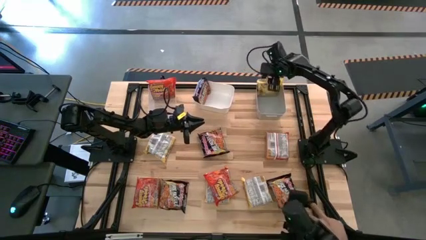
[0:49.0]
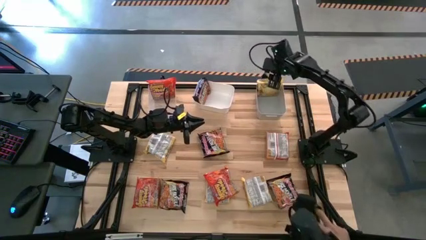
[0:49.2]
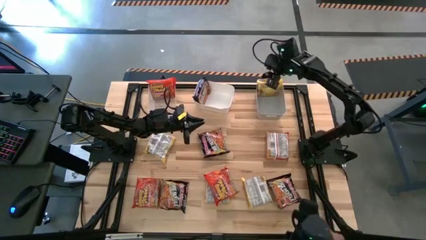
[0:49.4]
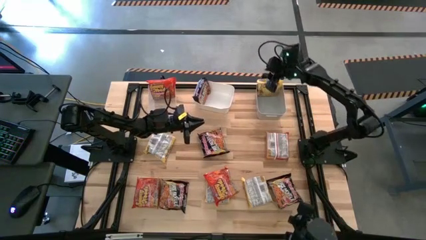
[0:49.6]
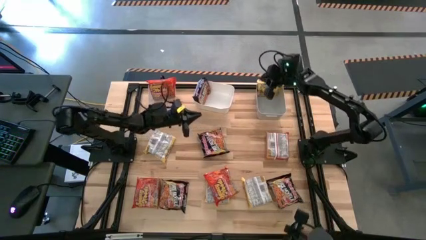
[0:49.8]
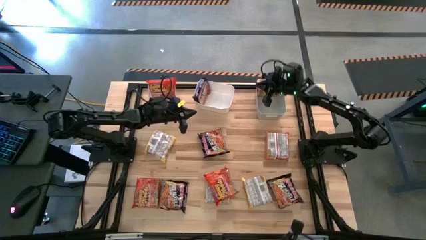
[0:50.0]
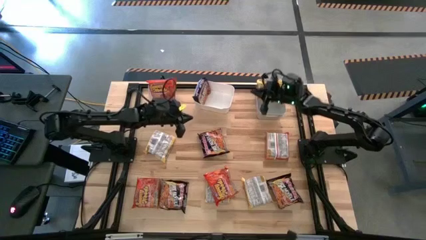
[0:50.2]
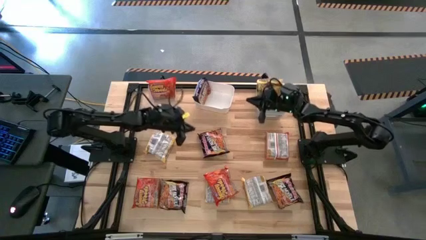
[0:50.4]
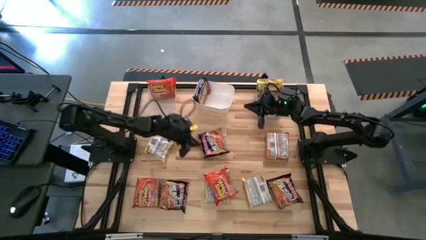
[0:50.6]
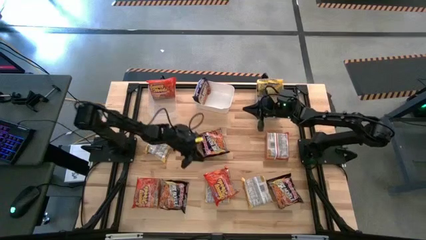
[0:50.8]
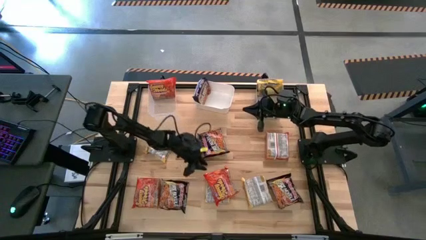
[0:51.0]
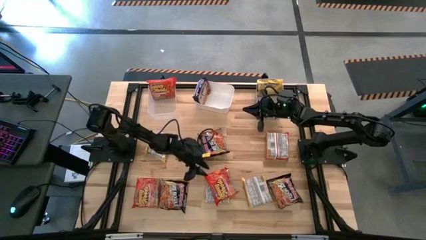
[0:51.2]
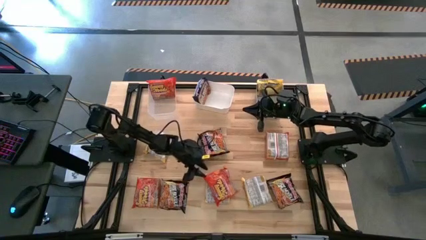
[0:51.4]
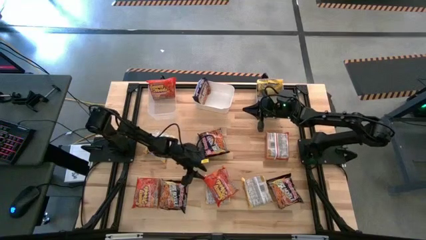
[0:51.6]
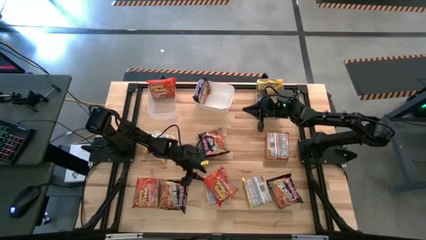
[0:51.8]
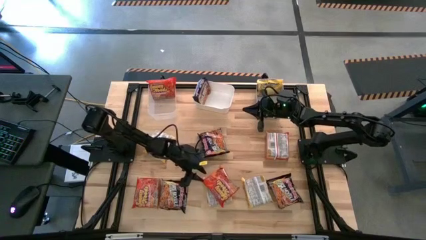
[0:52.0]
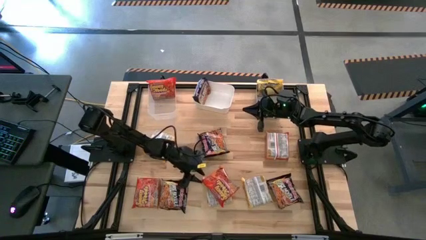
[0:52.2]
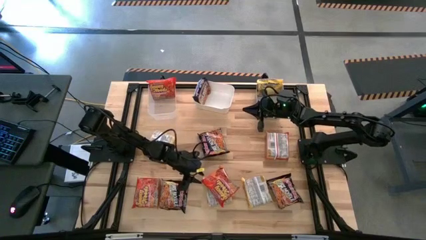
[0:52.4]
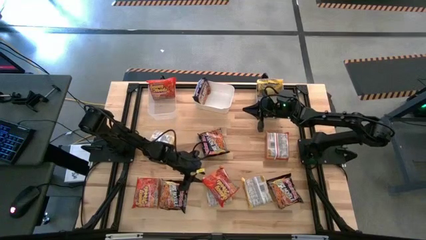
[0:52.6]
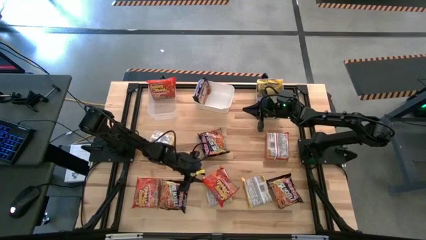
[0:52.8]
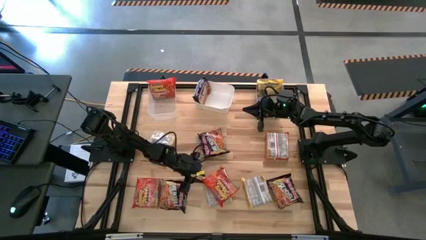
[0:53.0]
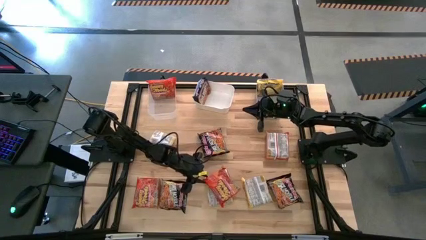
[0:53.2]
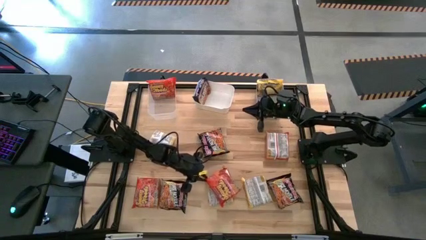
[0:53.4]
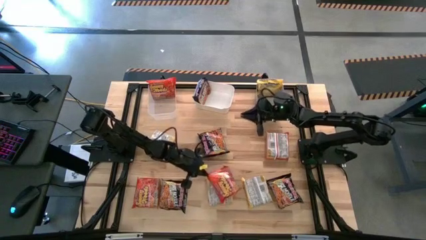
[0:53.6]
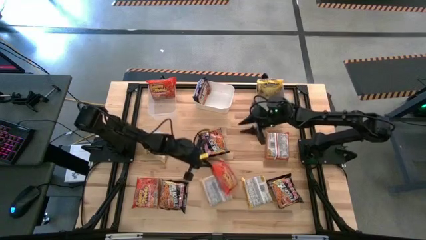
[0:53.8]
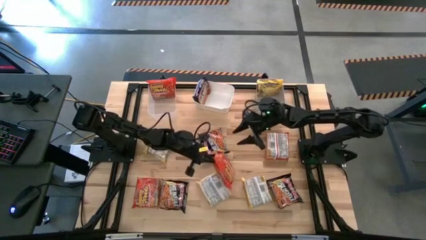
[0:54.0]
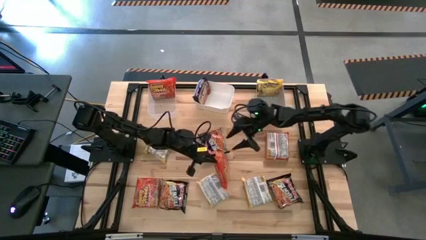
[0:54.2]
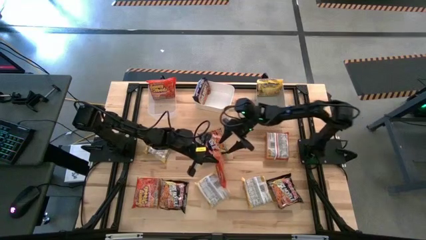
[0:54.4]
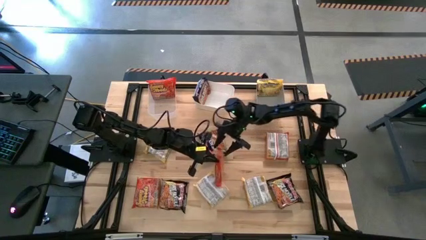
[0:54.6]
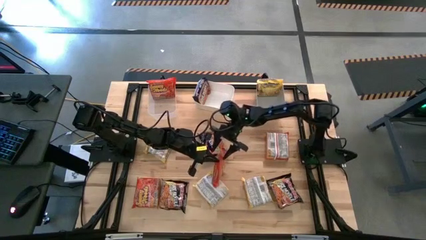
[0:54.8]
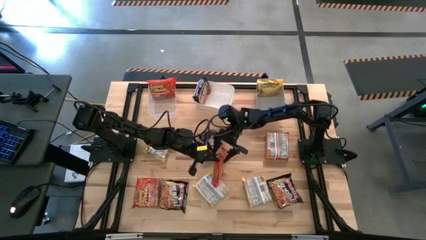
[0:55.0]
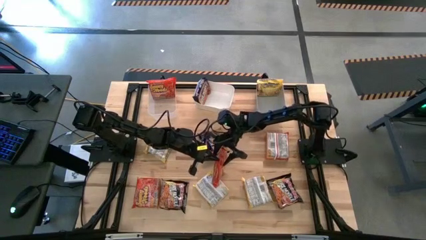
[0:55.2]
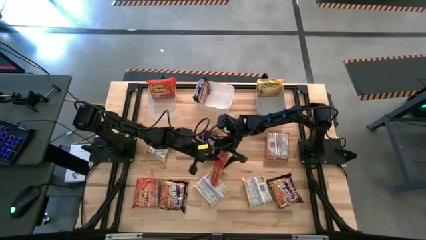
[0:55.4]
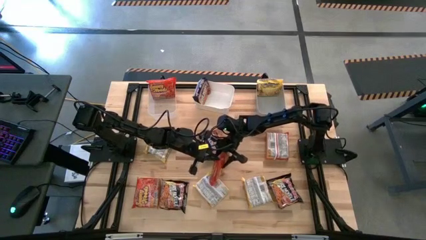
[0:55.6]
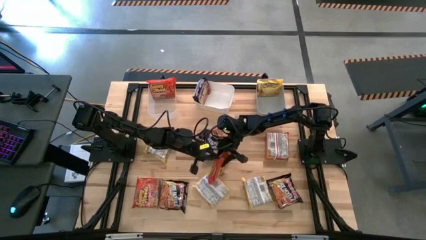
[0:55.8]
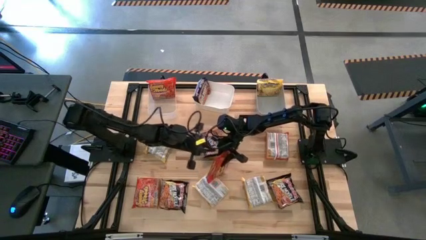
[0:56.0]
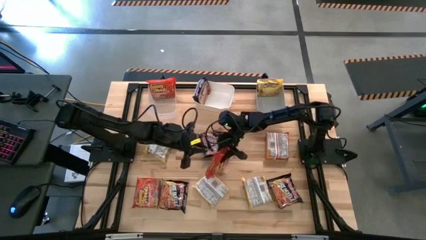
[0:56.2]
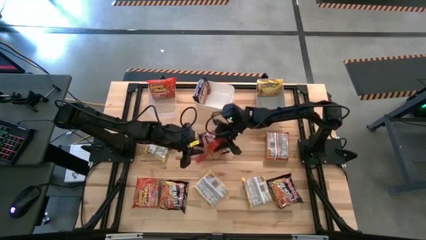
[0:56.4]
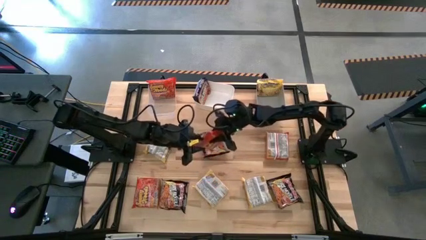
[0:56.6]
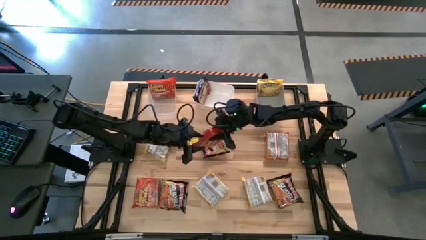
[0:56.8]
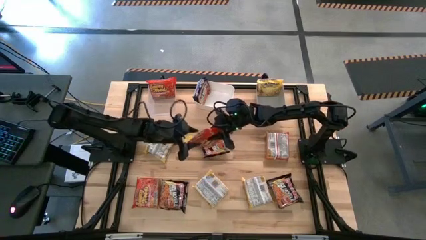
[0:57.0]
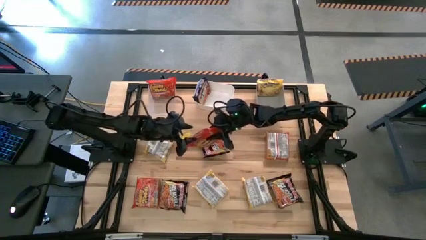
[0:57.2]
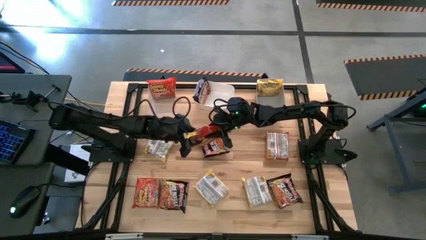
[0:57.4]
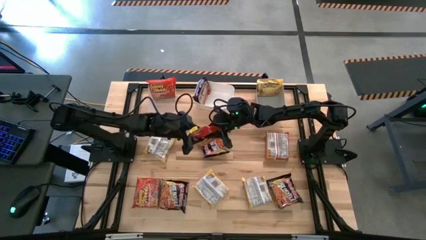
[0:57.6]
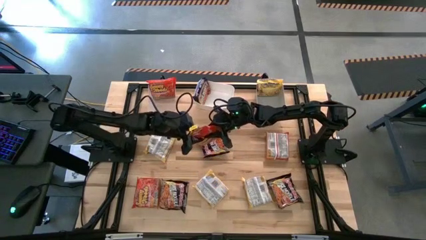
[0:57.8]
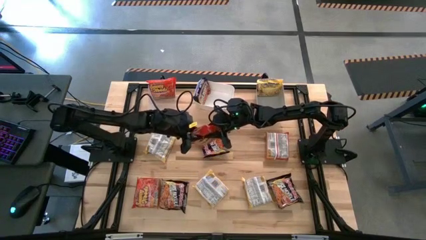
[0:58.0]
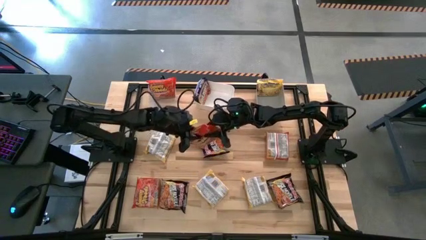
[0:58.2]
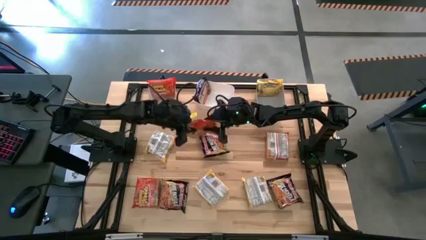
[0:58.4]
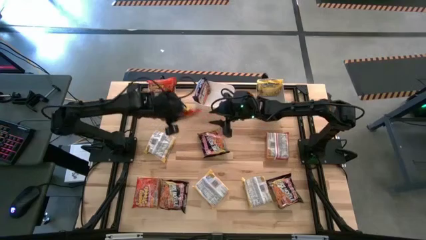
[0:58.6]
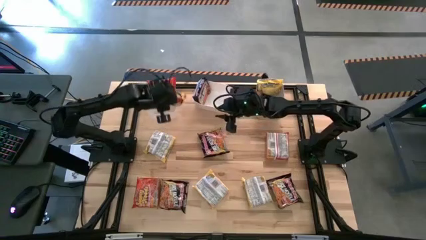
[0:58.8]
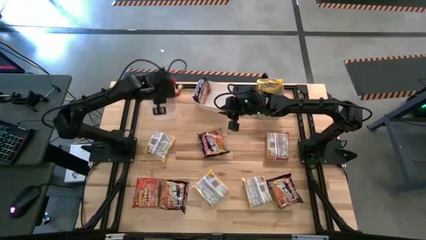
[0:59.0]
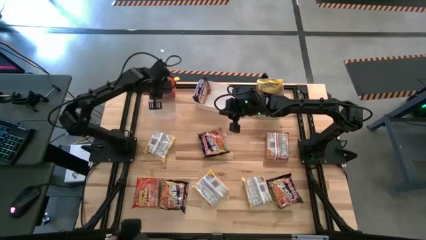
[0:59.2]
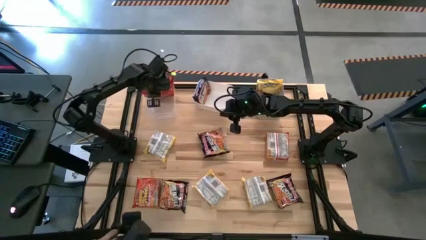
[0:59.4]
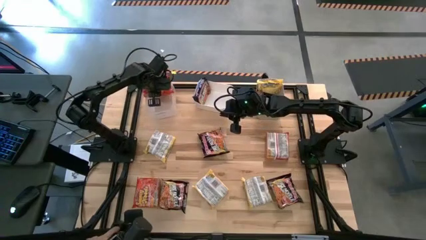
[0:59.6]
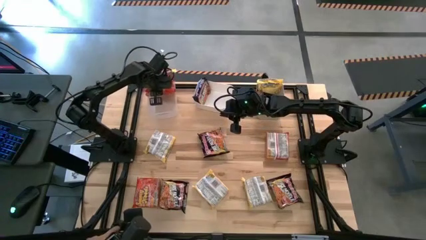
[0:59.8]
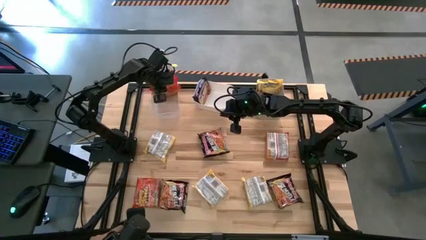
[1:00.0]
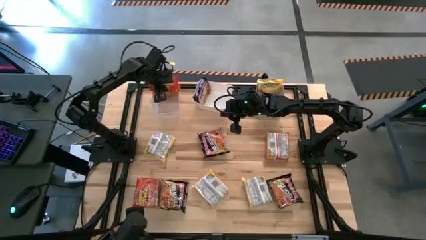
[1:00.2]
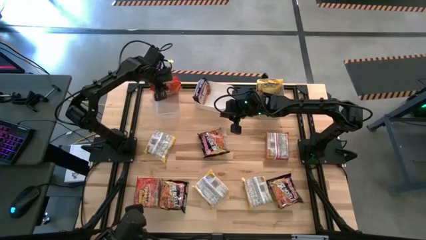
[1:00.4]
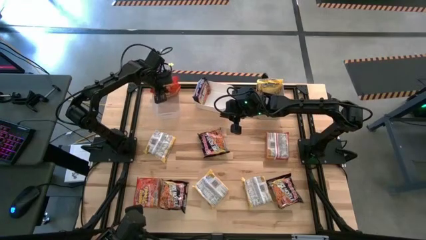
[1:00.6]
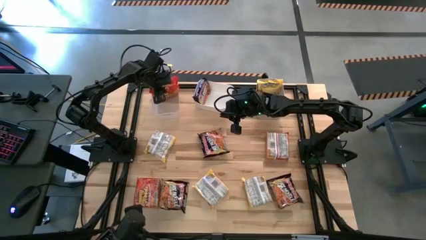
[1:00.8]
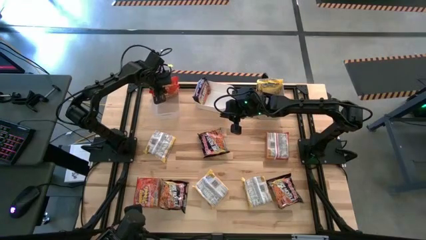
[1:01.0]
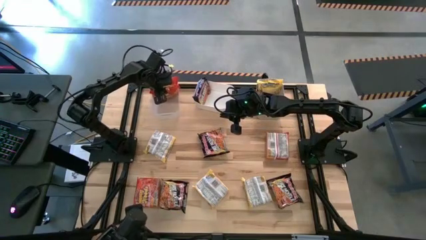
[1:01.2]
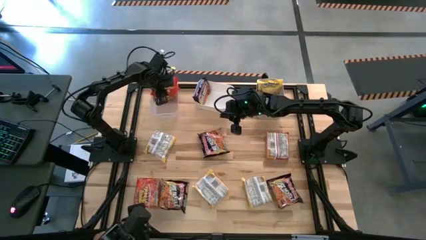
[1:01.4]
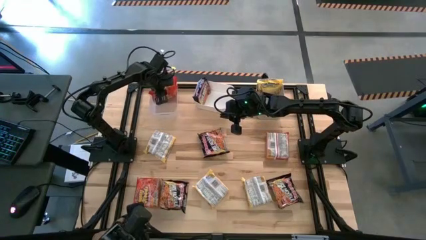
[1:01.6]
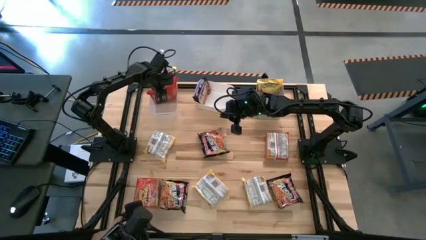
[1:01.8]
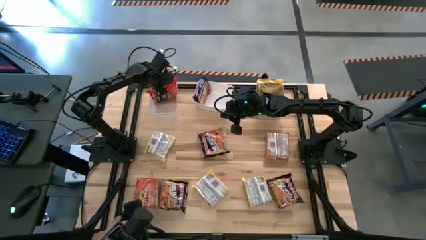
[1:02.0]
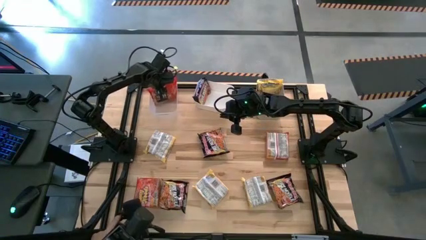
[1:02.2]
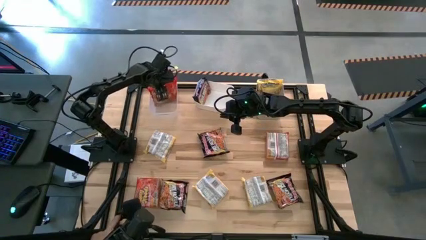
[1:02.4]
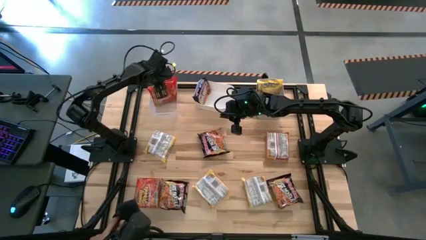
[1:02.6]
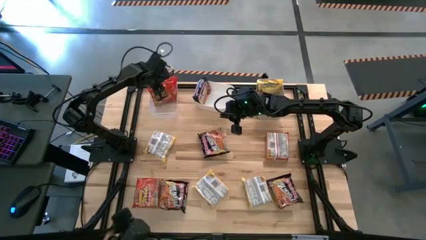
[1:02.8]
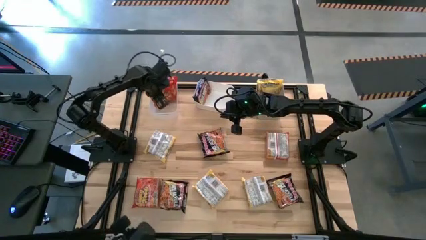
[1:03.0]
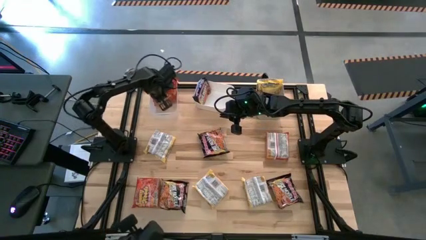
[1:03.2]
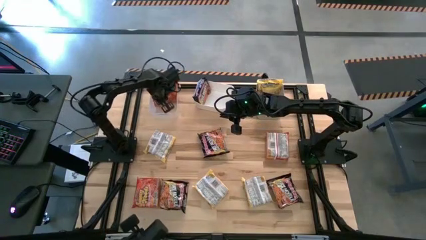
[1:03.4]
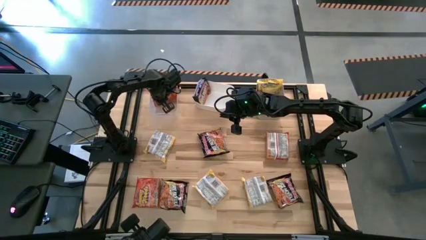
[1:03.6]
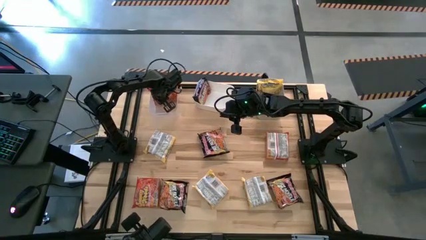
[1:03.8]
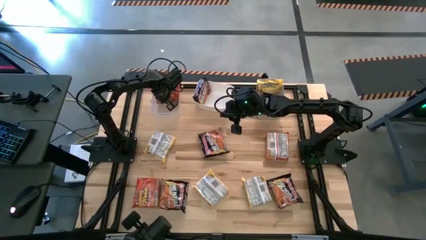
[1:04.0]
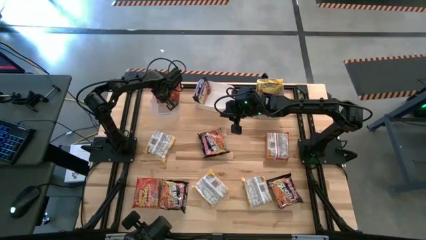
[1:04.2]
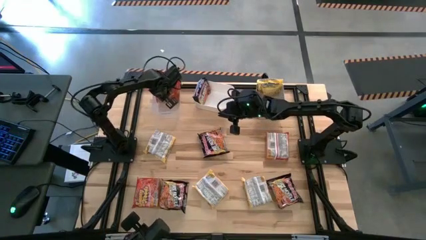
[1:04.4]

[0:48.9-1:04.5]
Task: Sort Maruchan noodles
Put the orange noodle pack into the transparent bin
